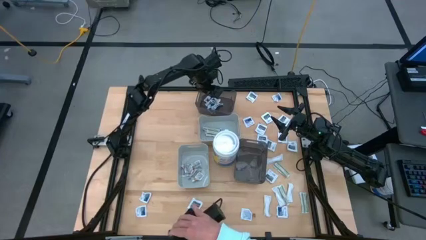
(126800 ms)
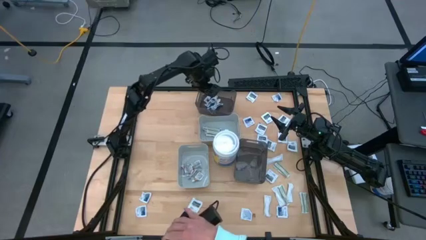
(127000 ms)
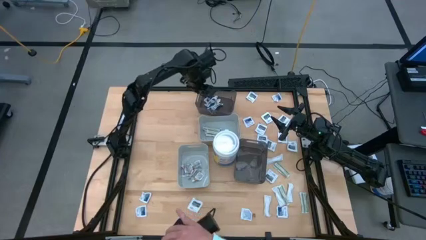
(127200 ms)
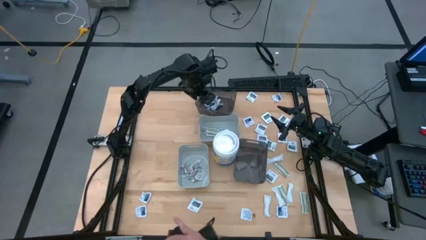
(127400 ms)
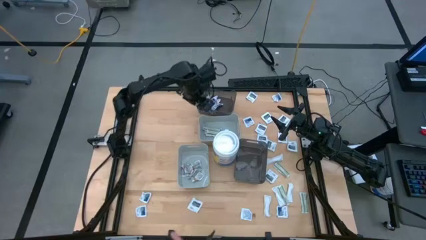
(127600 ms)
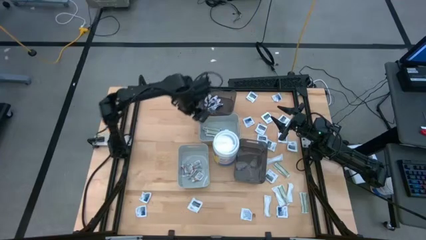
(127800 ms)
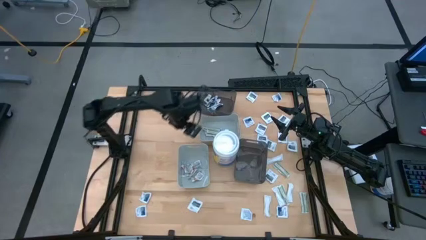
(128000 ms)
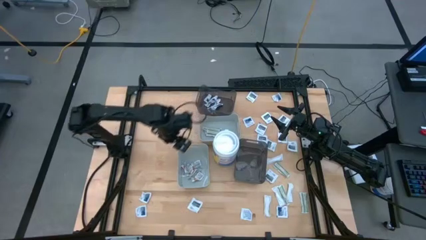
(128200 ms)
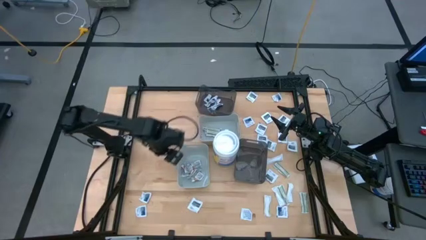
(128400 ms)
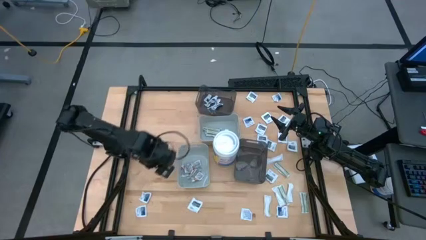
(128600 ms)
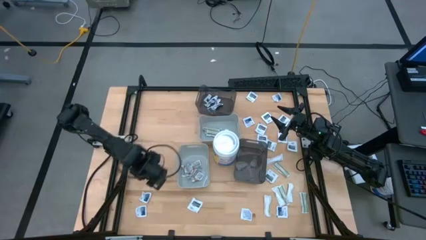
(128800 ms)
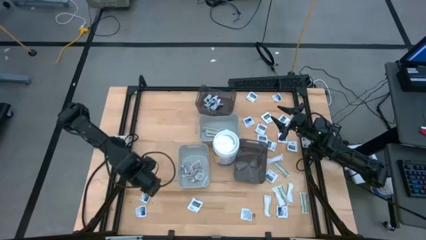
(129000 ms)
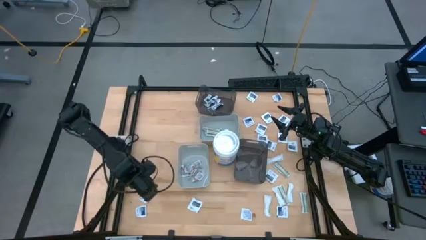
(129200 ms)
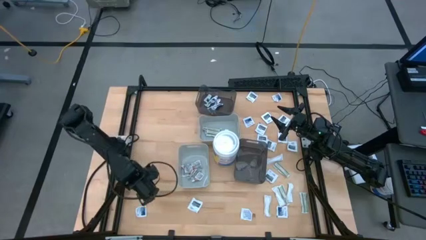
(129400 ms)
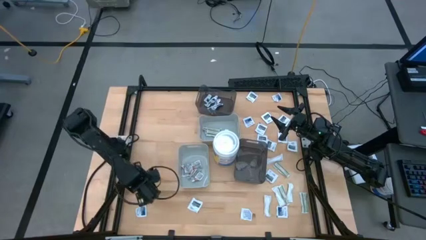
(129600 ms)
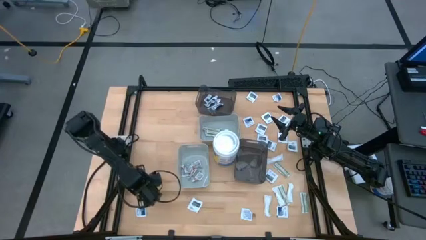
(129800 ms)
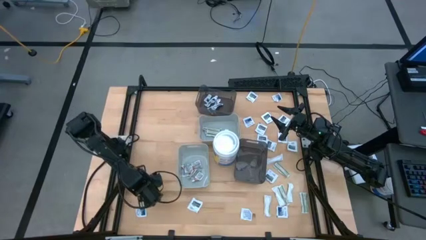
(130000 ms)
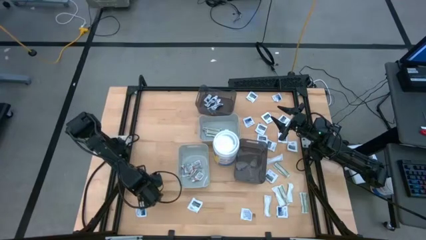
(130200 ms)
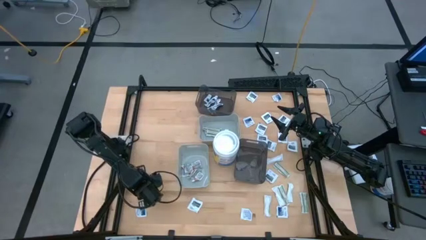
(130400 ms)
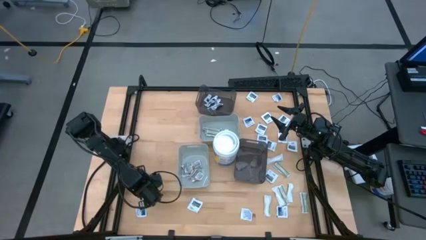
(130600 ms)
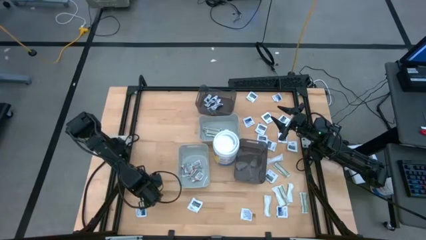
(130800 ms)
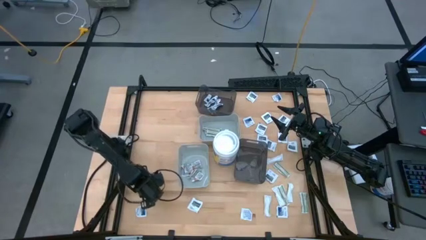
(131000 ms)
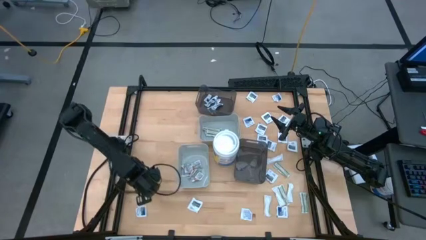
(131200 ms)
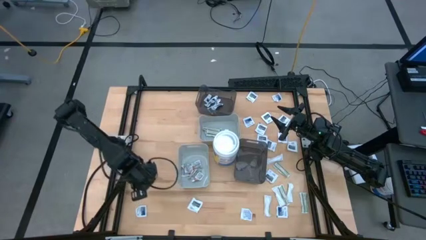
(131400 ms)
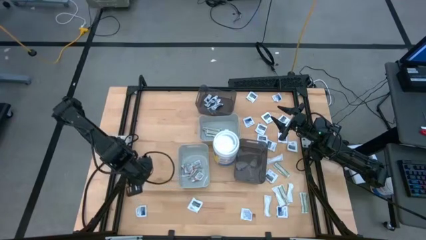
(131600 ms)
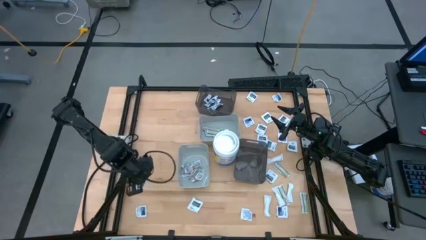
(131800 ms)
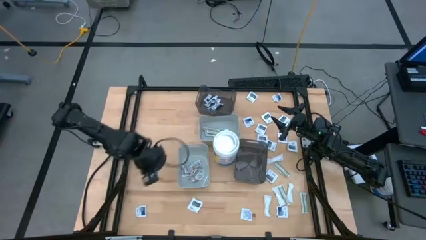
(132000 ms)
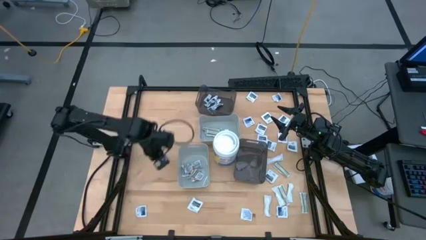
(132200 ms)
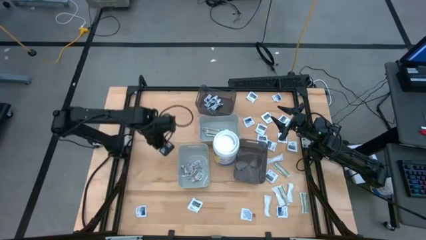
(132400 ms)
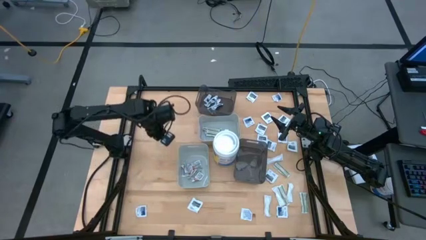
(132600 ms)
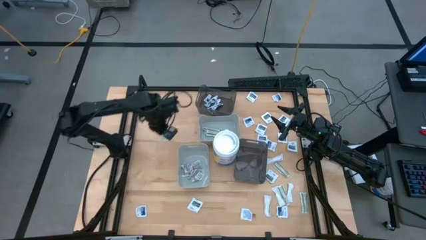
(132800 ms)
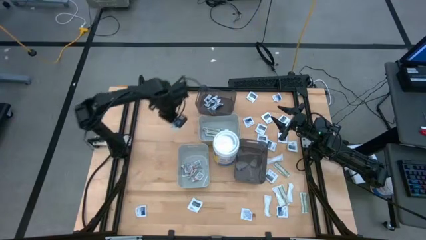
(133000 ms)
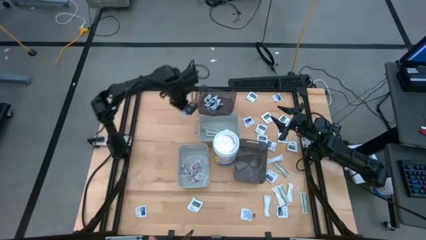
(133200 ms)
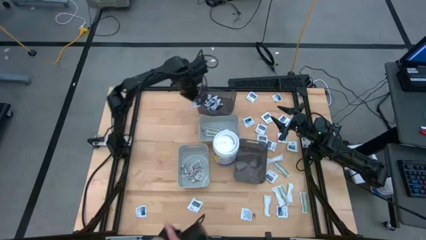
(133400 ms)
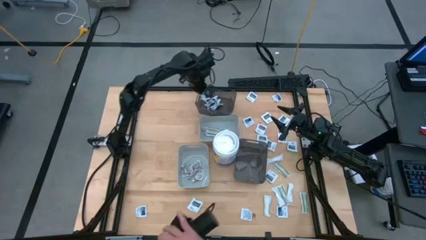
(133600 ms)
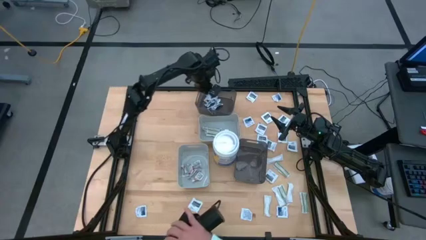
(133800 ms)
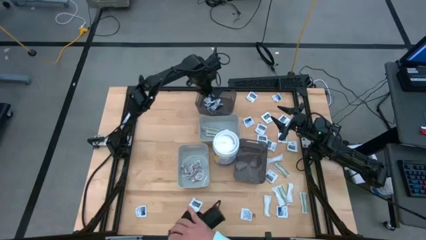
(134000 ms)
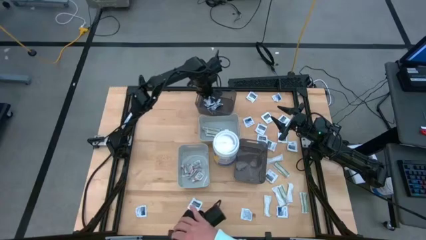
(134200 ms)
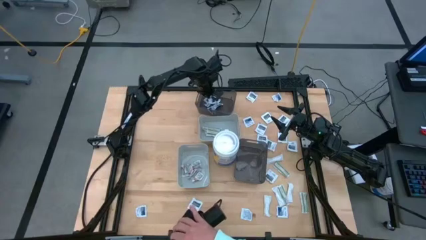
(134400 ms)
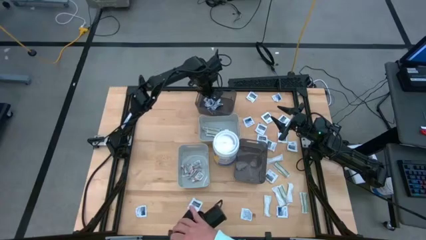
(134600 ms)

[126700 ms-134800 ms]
Task: Pick & Place First Aid Supplies
Put the alcohol pad into the top transparent black bin

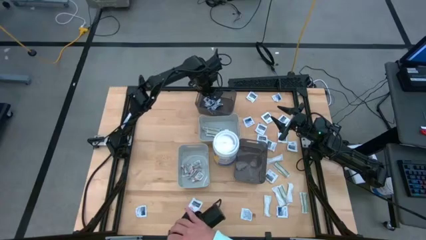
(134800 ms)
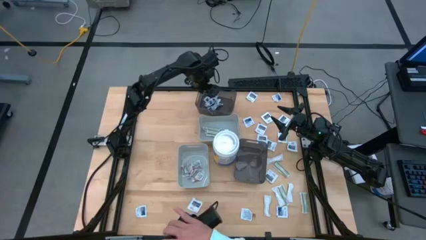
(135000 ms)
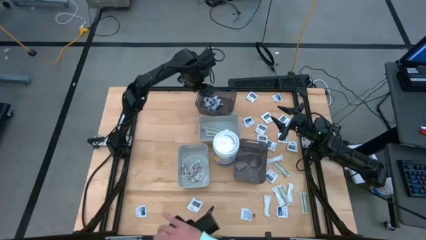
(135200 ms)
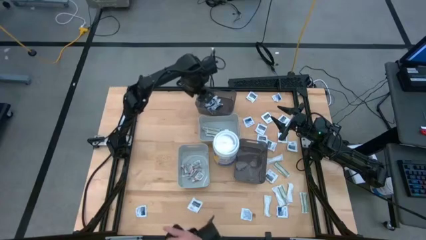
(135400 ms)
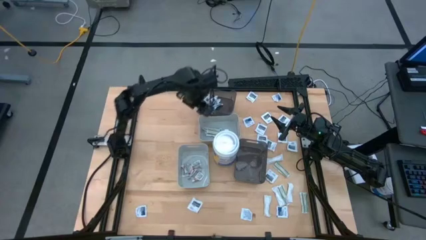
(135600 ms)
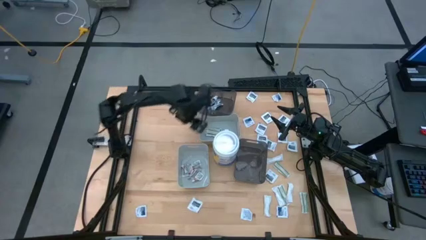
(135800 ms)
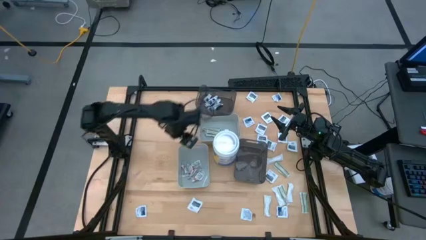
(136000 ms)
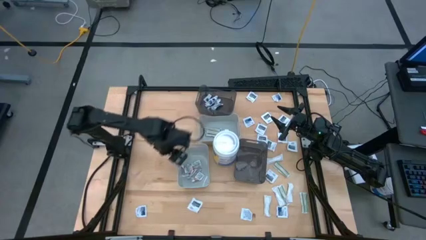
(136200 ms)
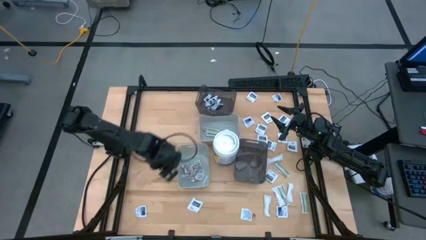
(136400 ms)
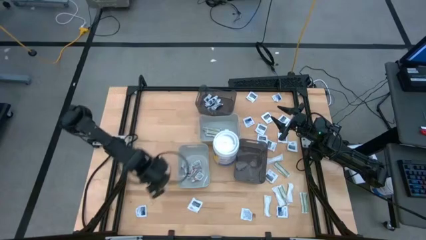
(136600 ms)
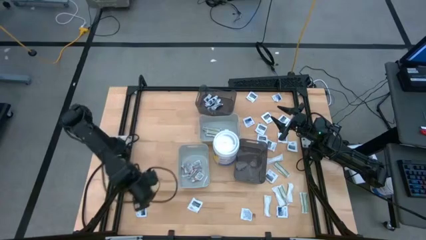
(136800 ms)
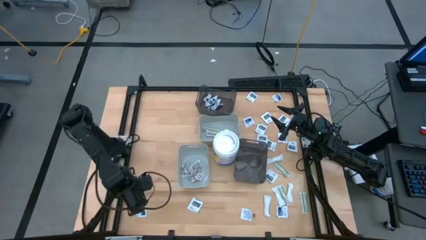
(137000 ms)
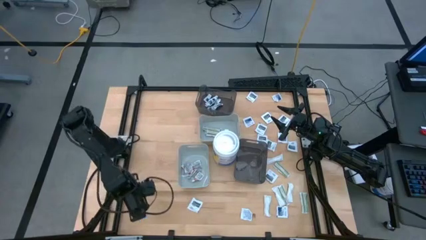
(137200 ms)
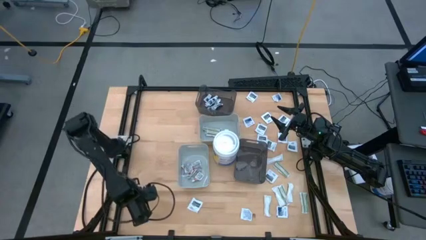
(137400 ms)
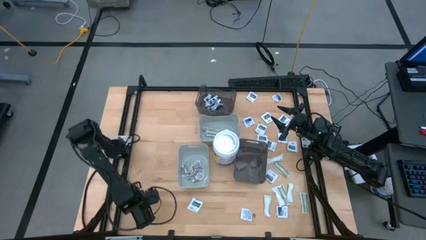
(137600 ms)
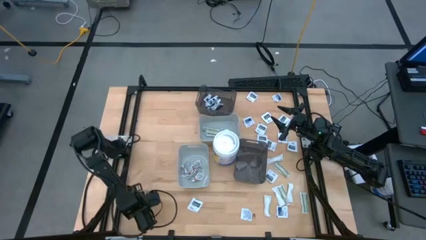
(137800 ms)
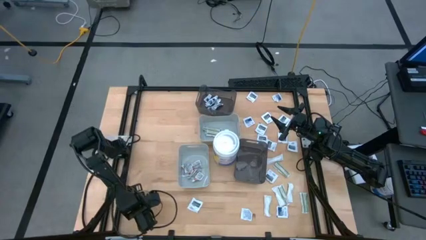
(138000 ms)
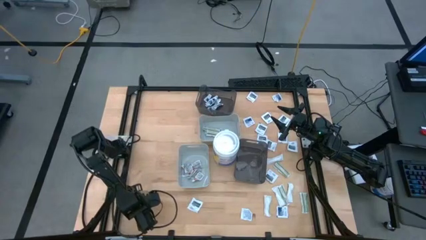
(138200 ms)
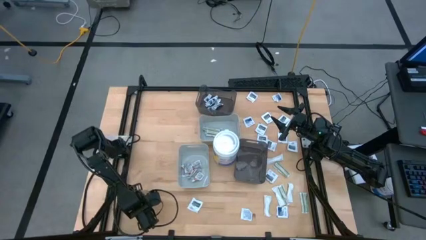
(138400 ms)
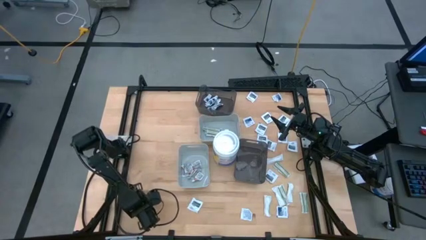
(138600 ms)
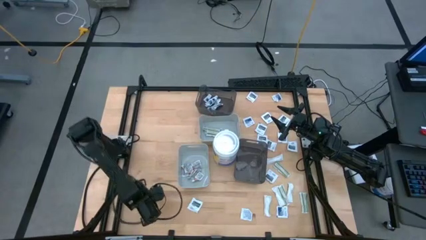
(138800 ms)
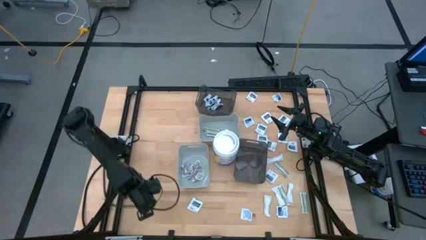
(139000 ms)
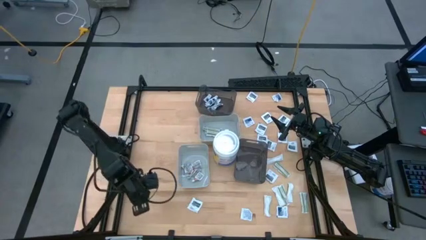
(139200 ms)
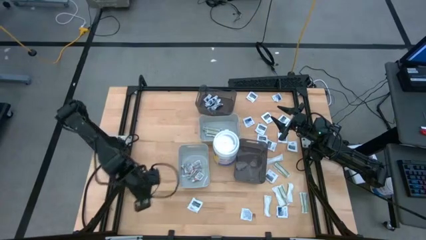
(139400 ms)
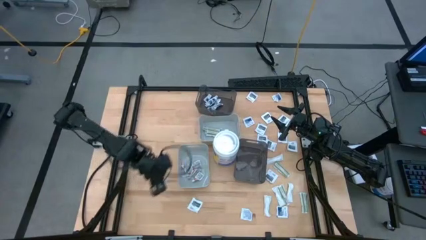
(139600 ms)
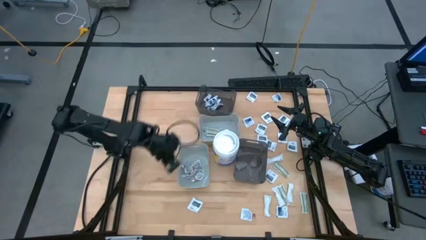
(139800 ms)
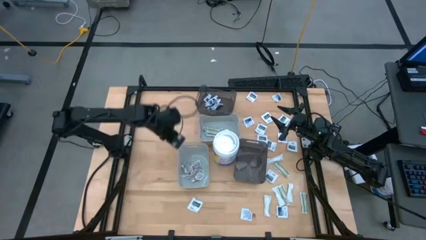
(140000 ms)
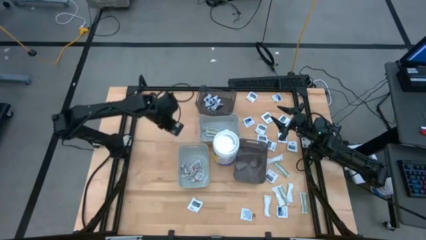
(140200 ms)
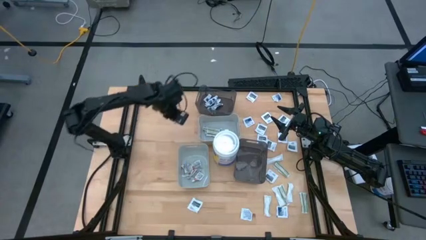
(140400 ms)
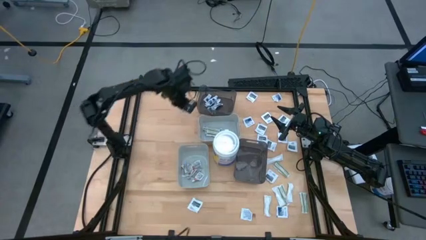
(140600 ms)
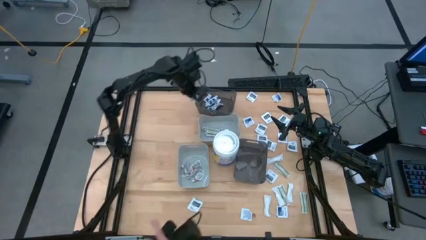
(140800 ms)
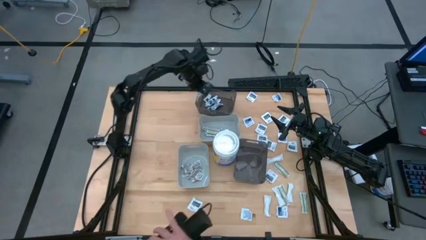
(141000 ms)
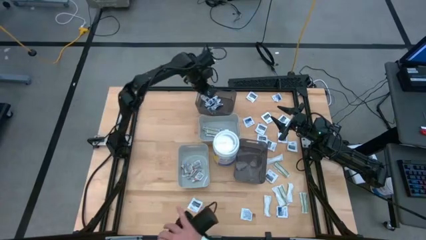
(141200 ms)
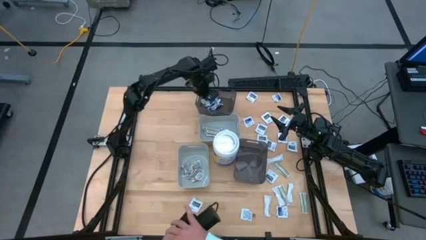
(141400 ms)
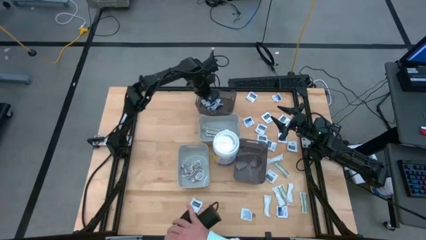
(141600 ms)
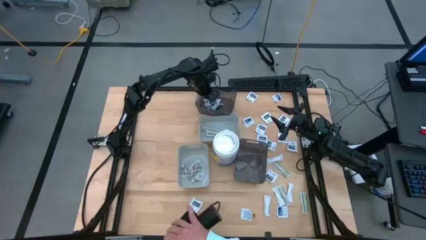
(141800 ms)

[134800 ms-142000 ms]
Put the alcohol pad into the top transparent black bin

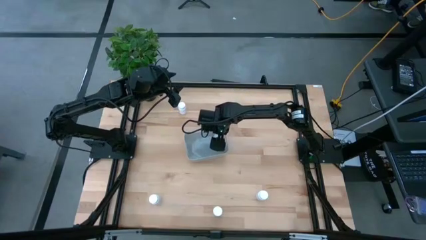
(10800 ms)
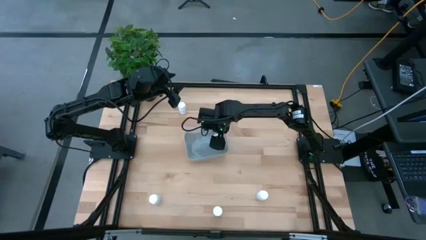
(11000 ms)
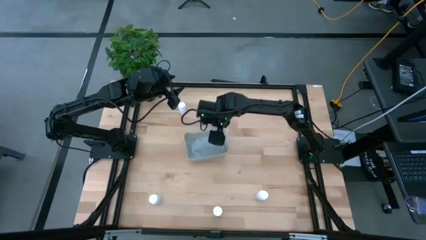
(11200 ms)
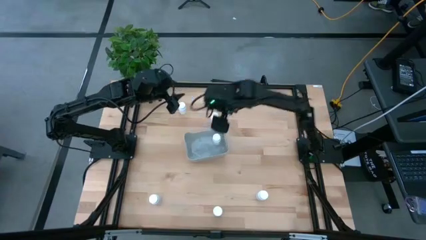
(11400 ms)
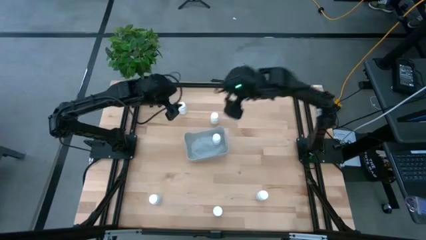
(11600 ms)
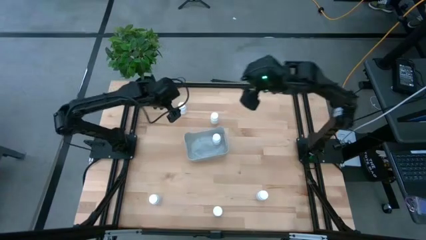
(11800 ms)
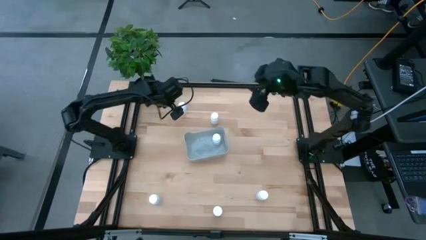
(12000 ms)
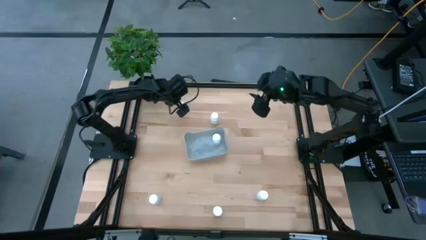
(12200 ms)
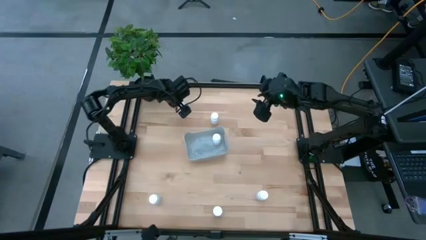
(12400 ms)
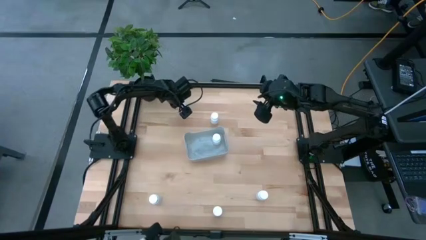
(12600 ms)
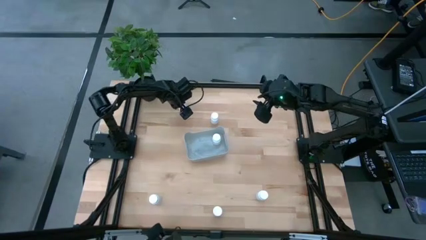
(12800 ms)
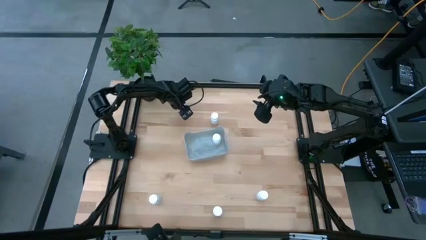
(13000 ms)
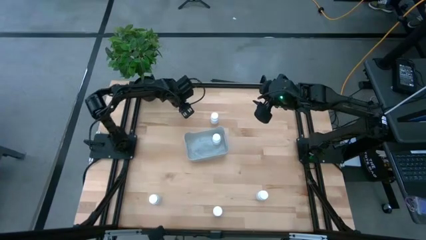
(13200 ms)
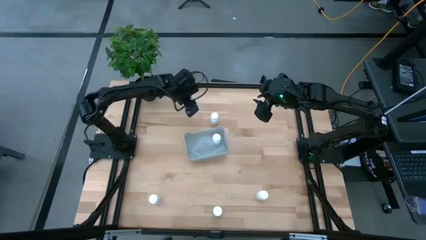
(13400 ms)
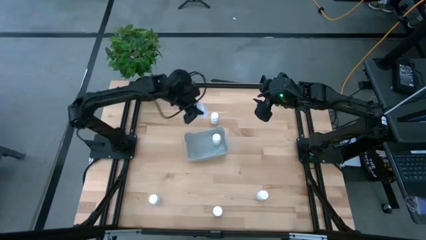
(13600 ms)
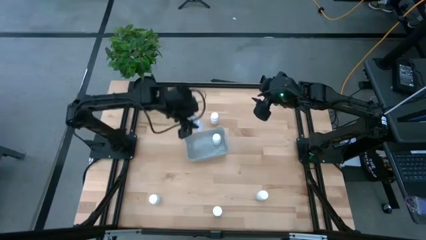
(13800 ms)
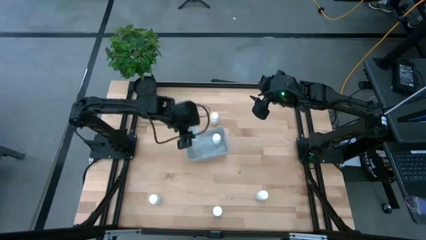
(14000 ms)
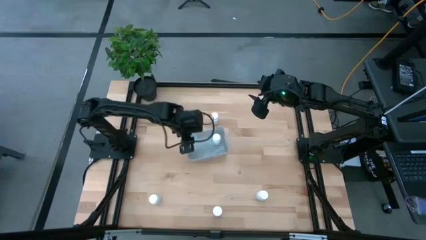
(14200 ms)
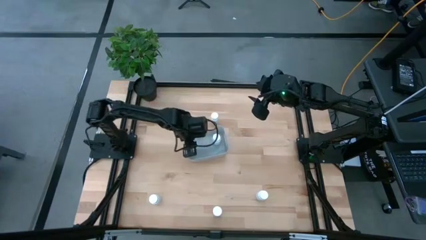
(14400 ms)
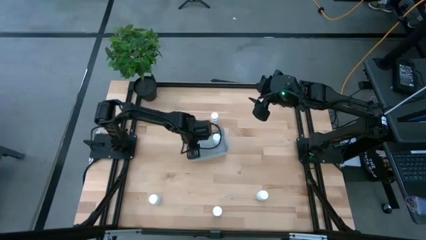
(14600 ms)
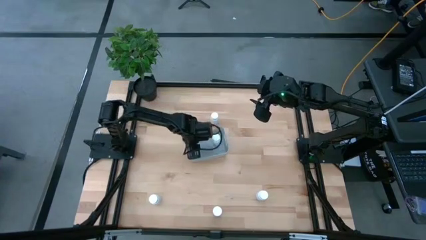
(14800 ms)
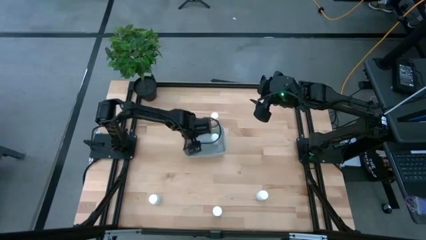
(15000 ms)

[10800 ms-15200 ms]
Task: Pick and place pill bottles into a basket
Put the white pill bottle into the gray basket
